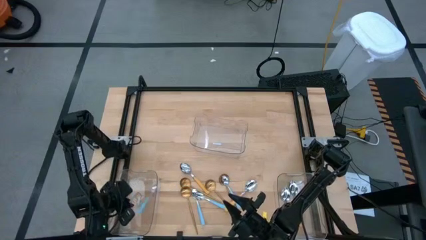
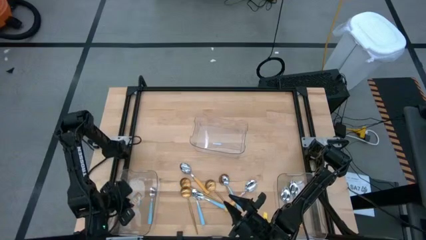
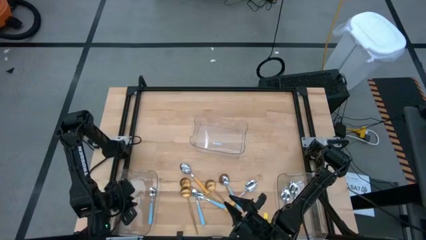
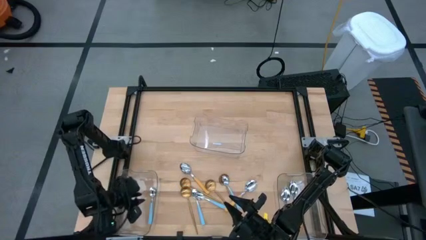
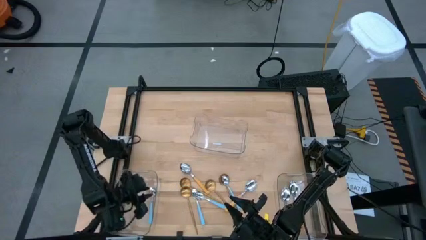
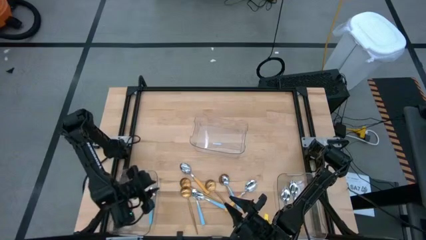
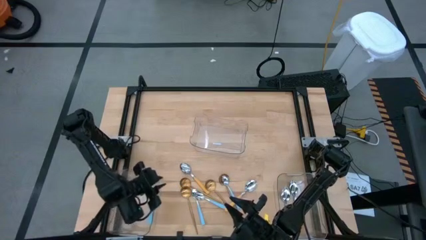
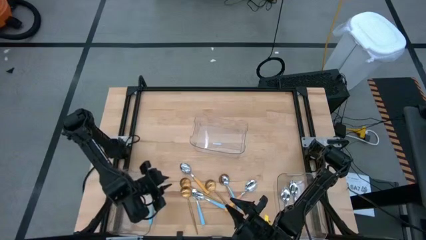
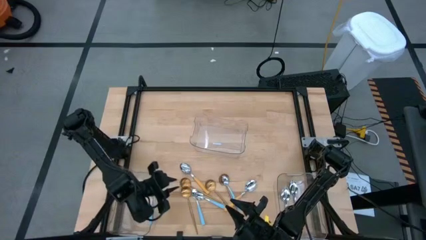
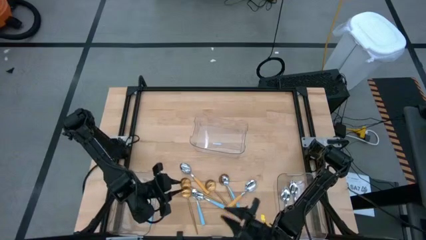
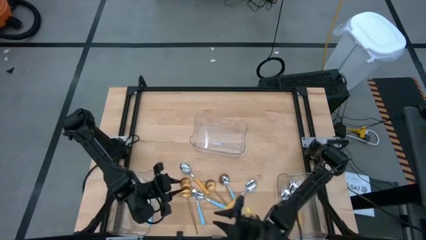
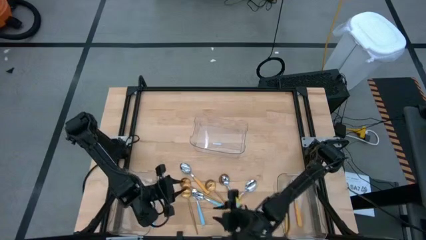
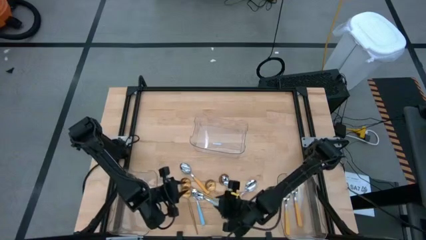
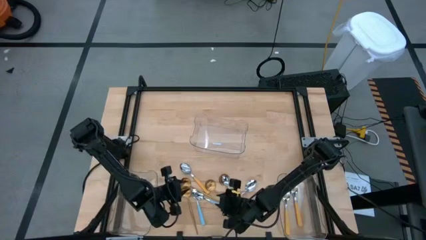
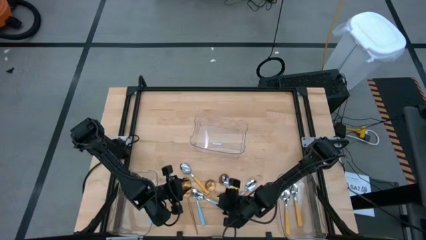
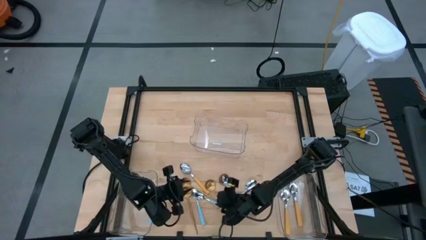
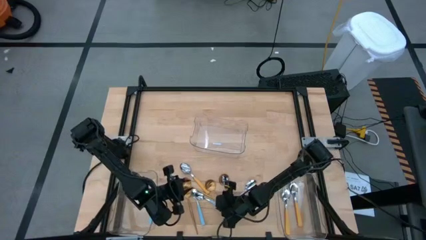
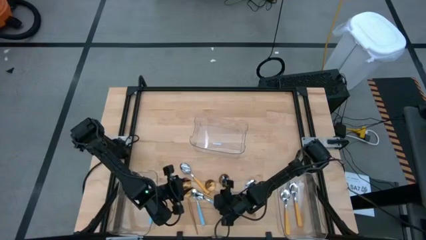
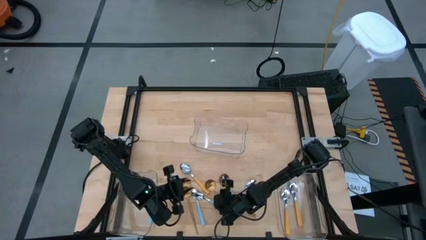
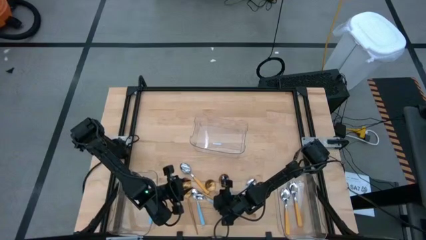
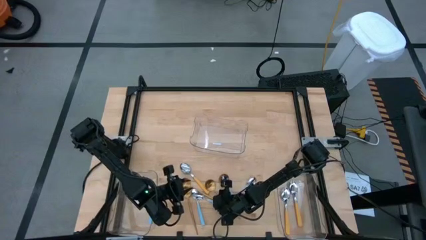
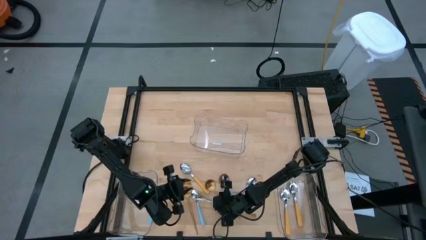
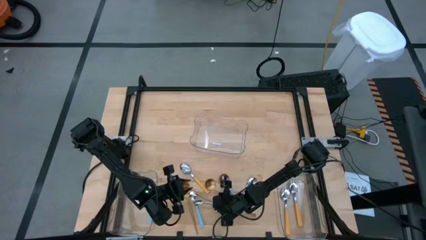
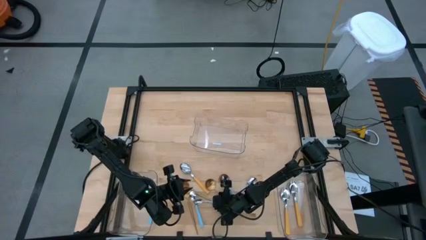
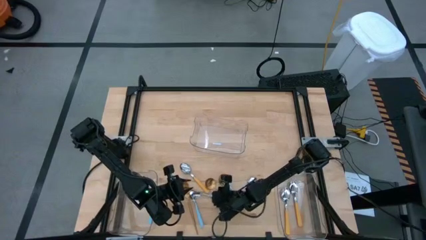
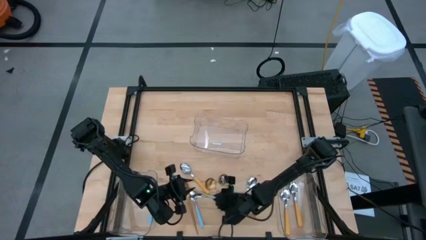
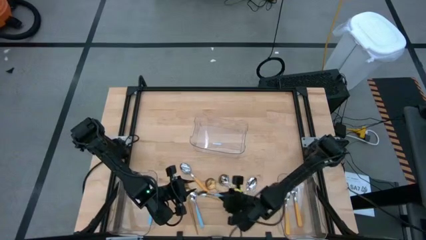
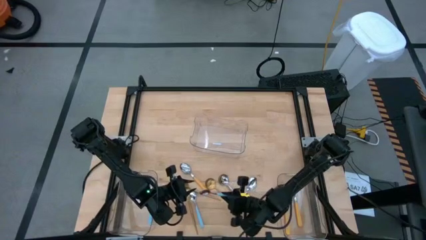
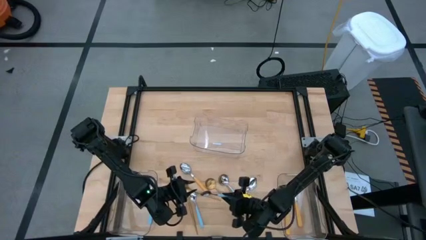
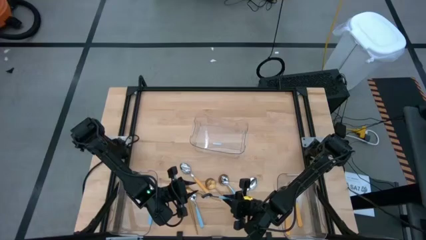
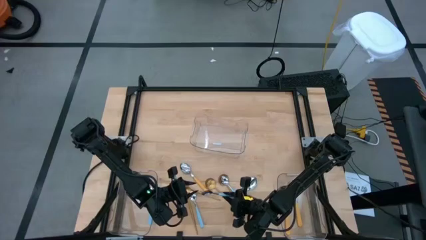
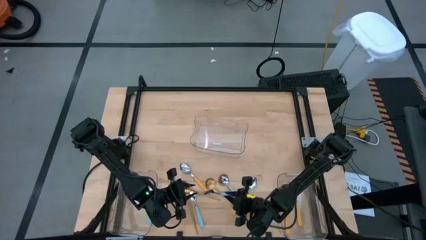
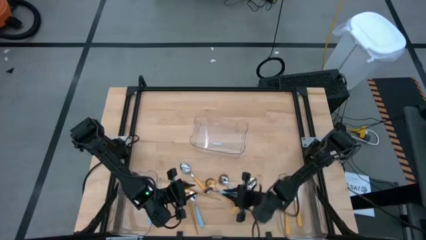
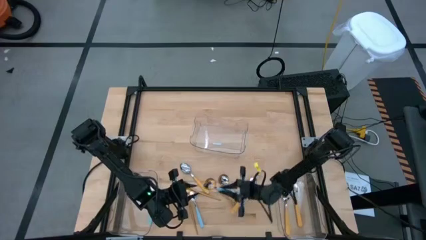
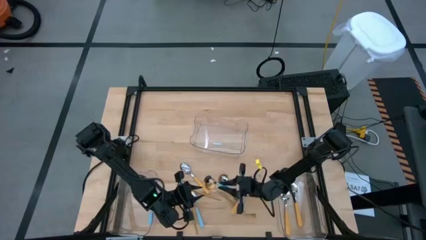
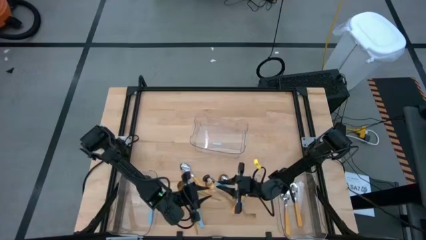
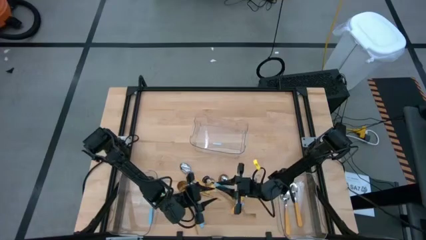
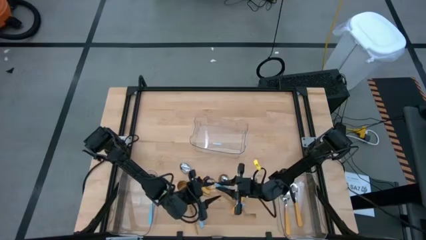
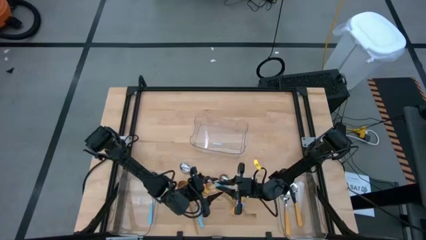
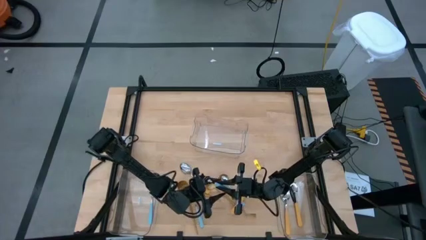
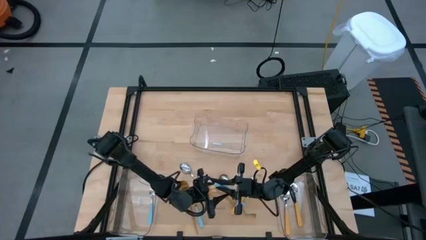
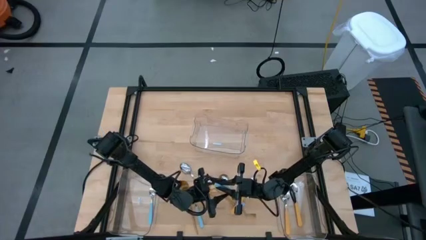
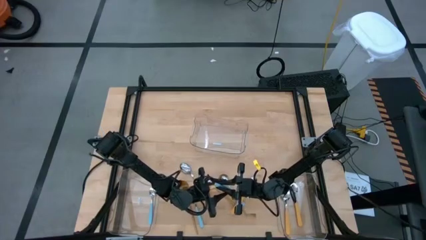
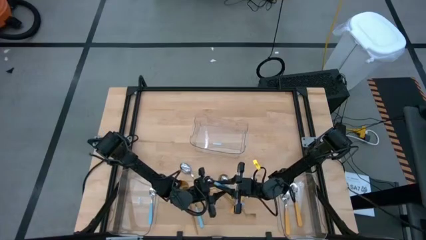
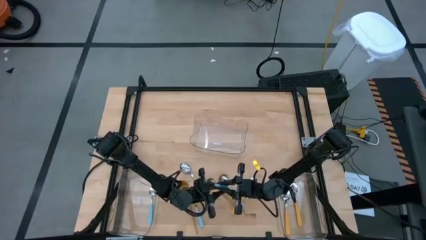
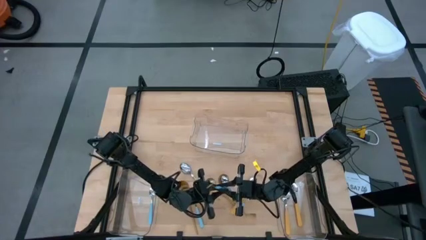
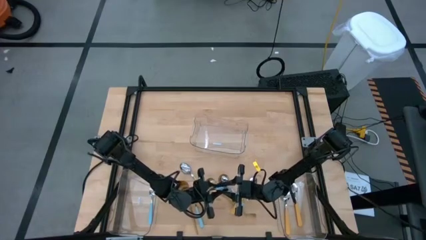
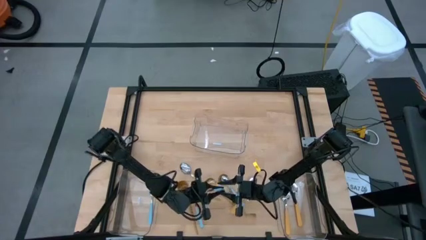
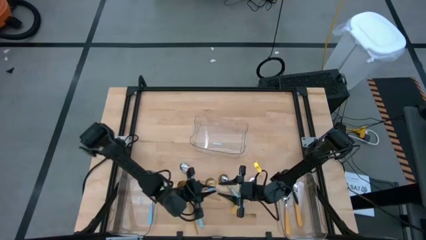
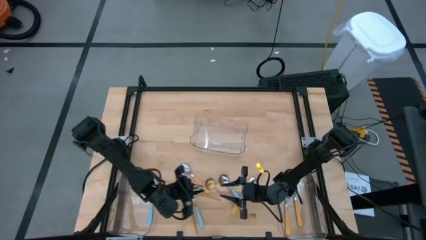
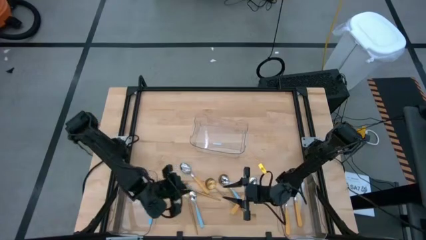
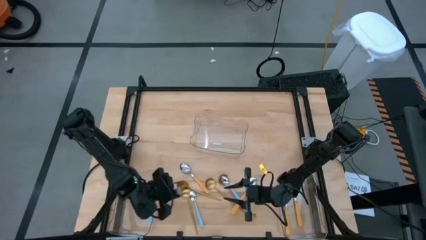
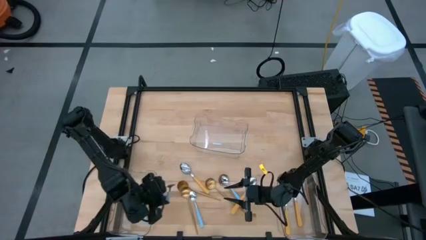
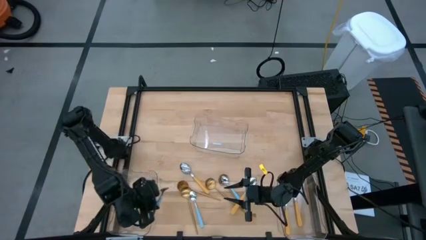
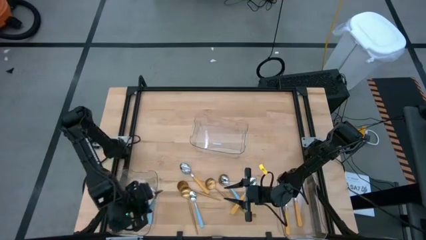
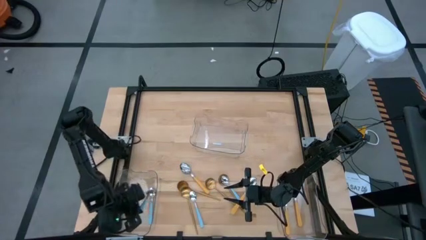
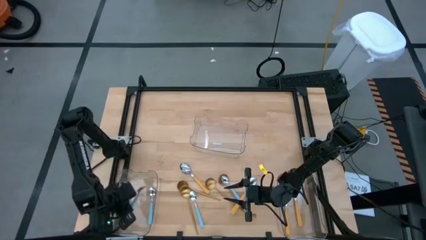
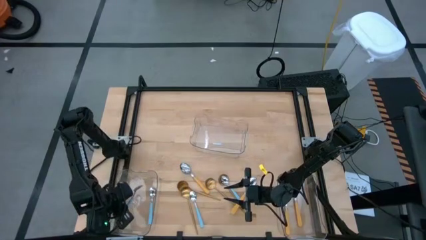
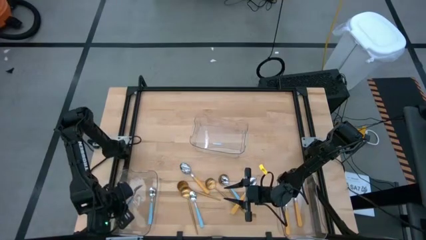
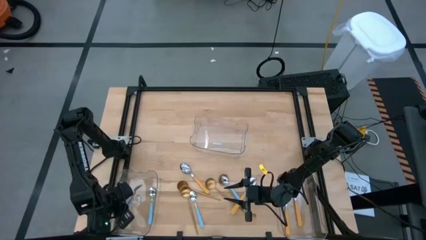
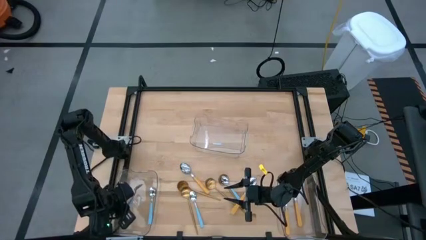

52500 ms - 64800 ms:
Task: Sort silverware by color (type)
Put the blue spoon into the bottom left transparent bin
